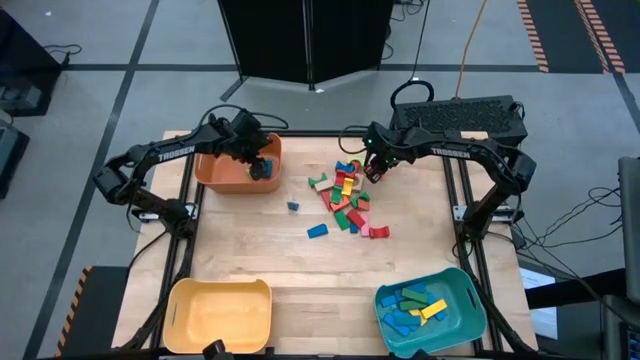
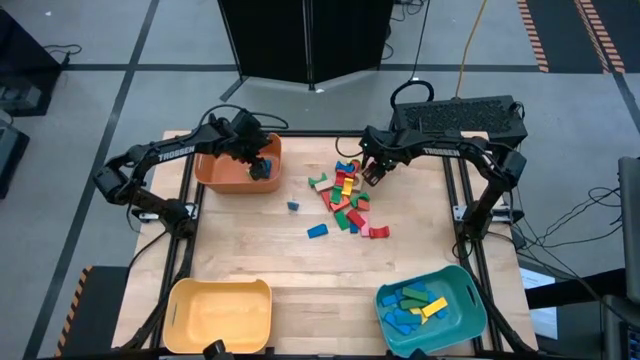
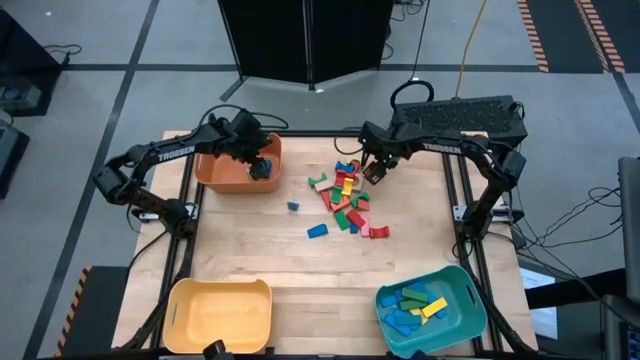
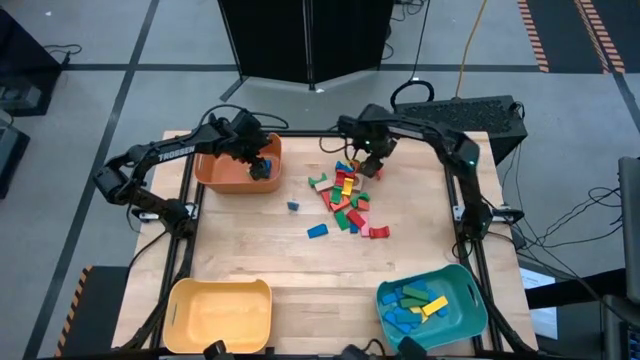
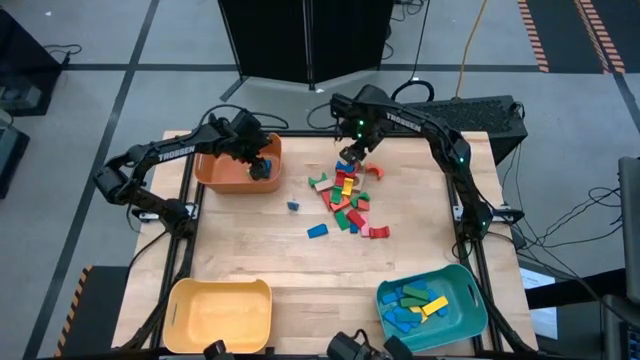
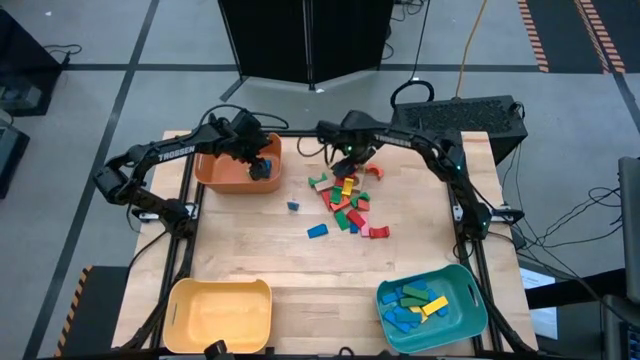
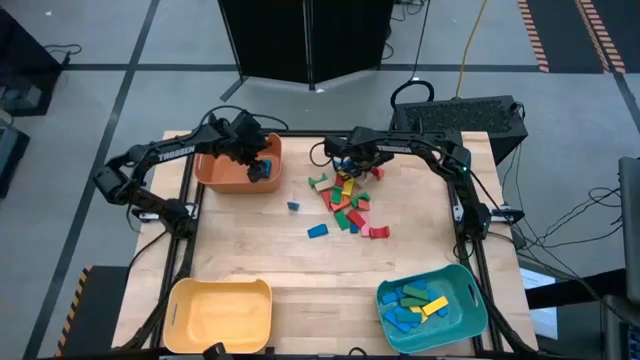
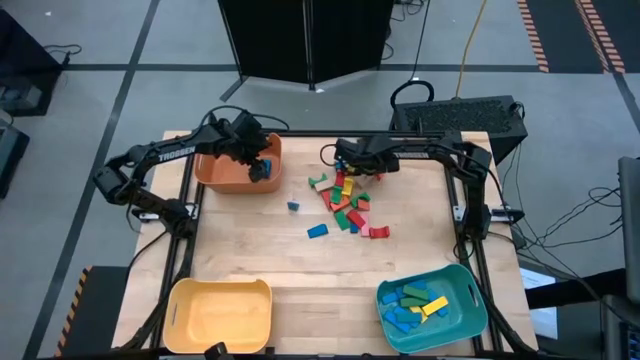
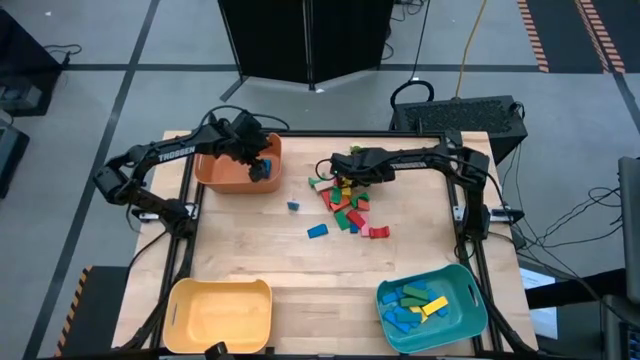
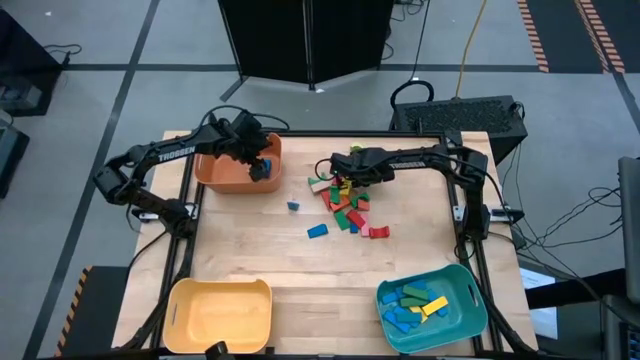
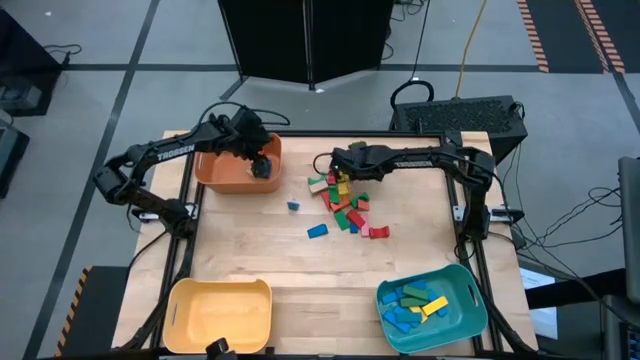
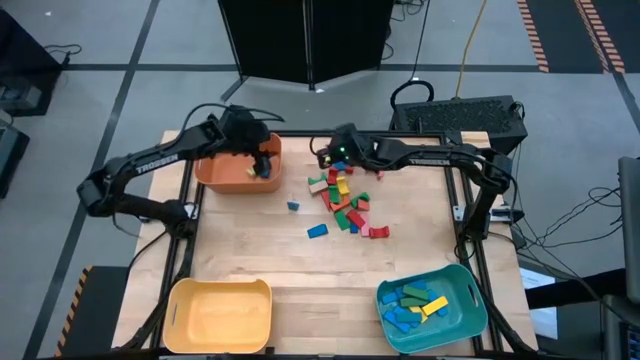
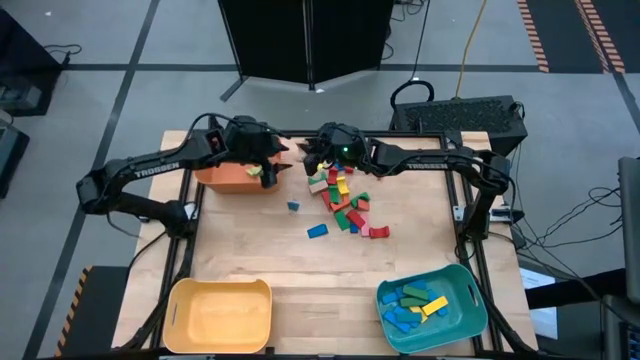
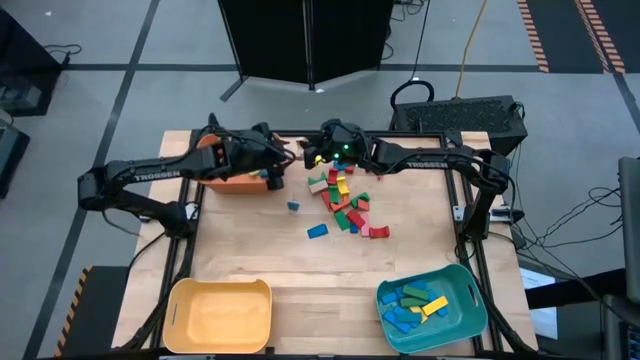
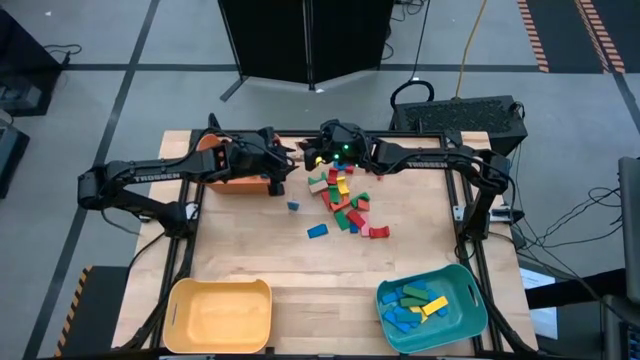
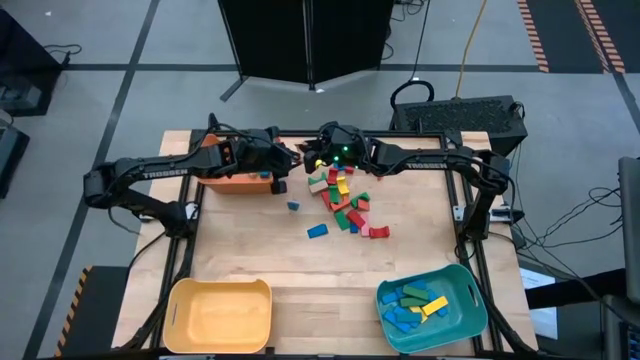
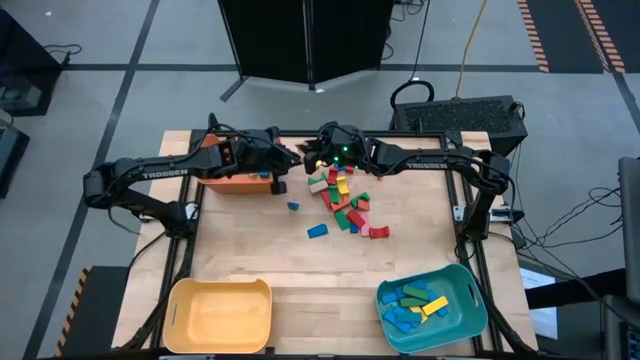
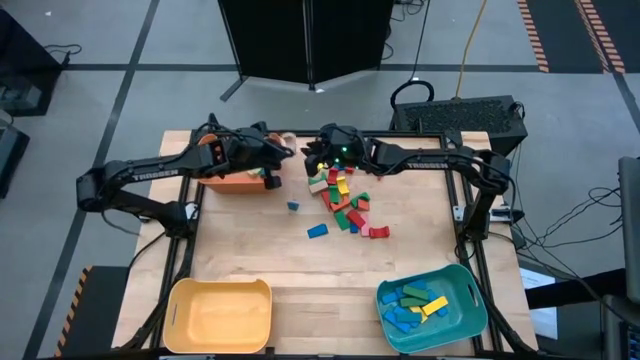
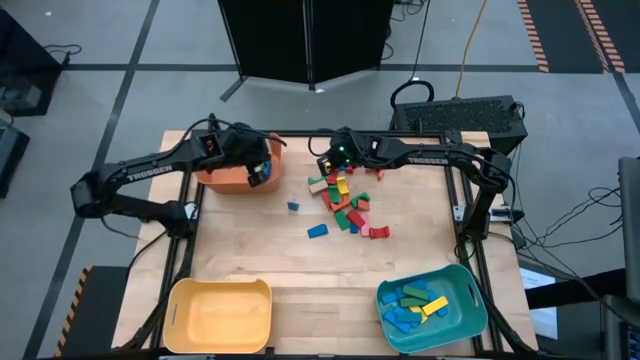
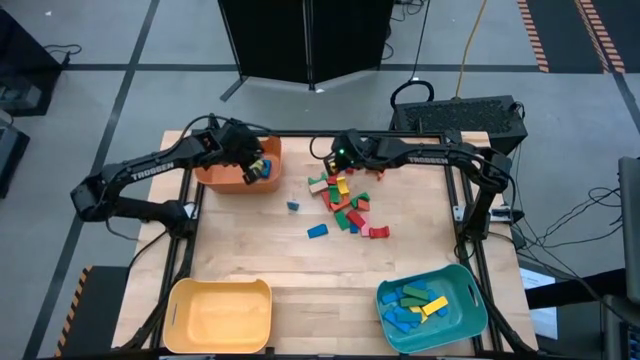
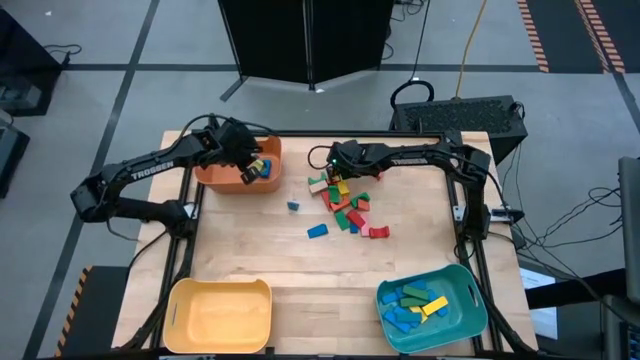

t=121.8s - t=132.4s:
Task: Sort blocks by size
Put the light brown arch block into the orange bin

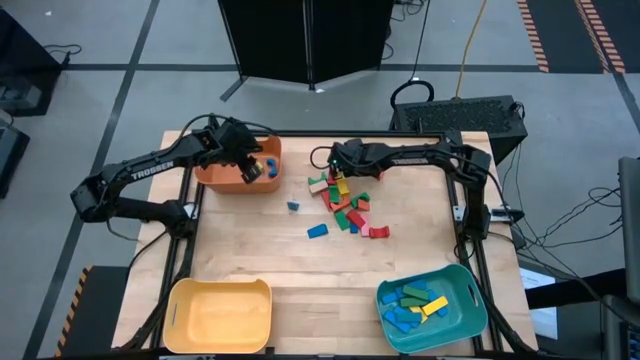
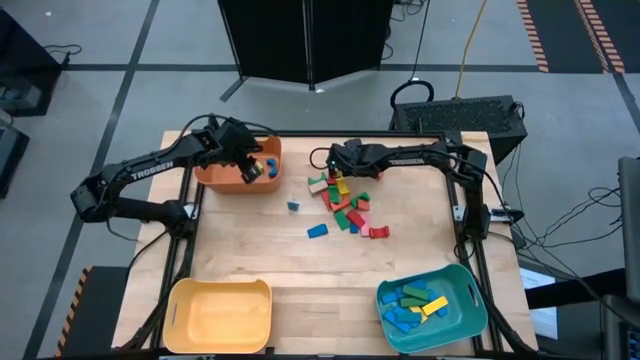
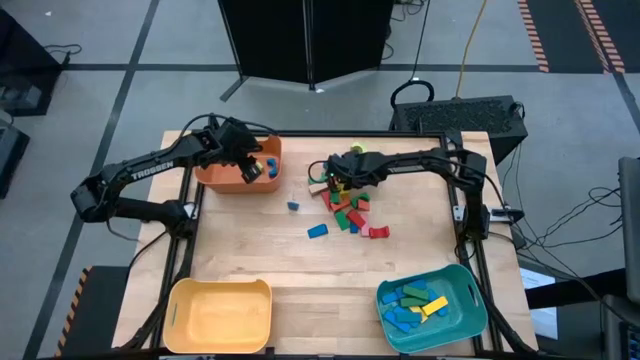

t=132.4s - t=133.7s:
Put the red arch block into the orange bin

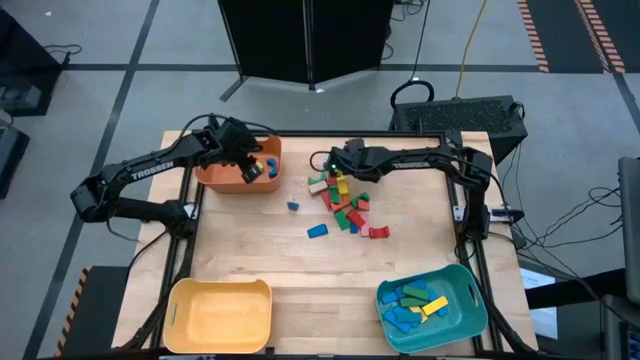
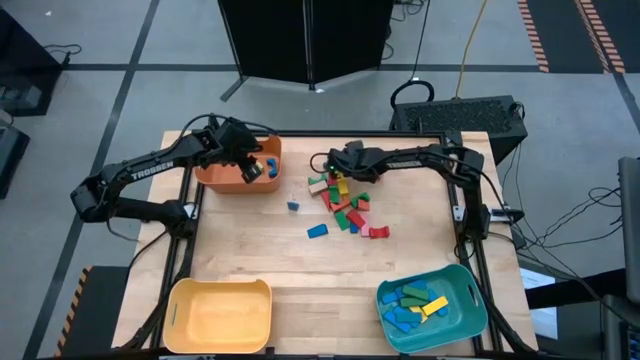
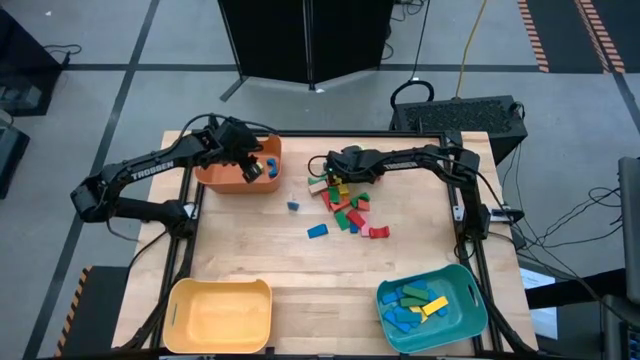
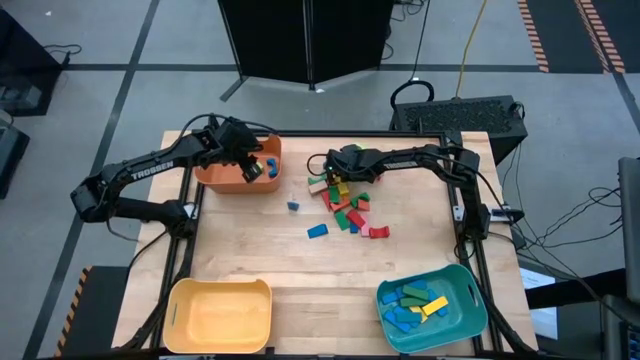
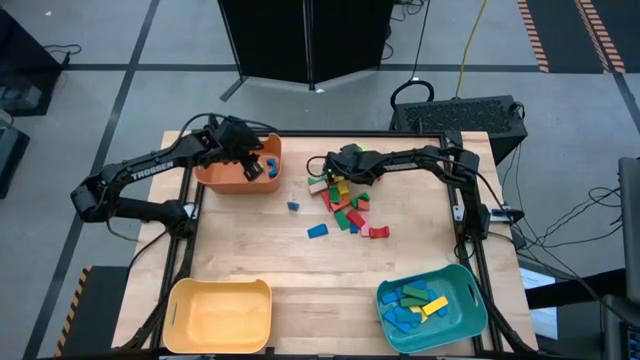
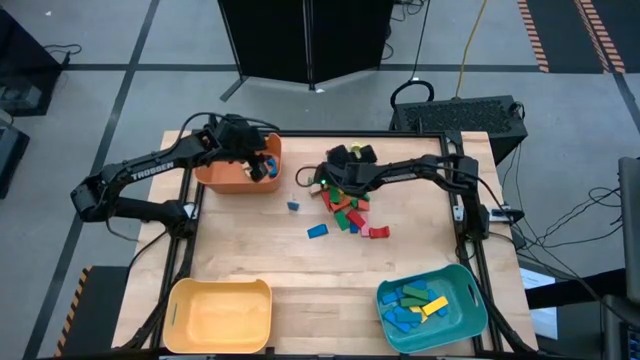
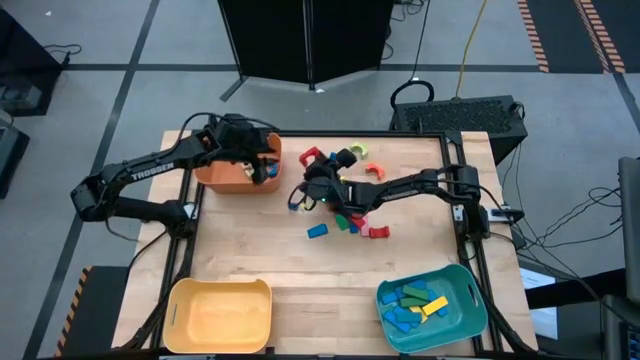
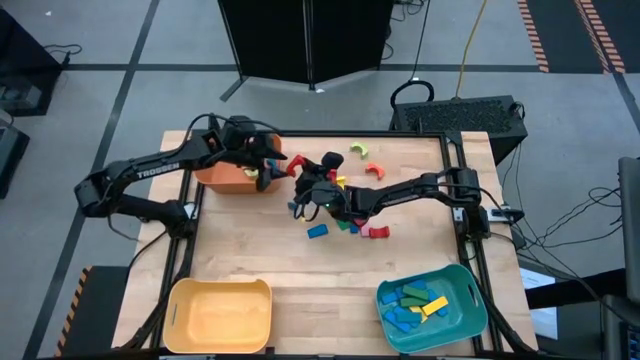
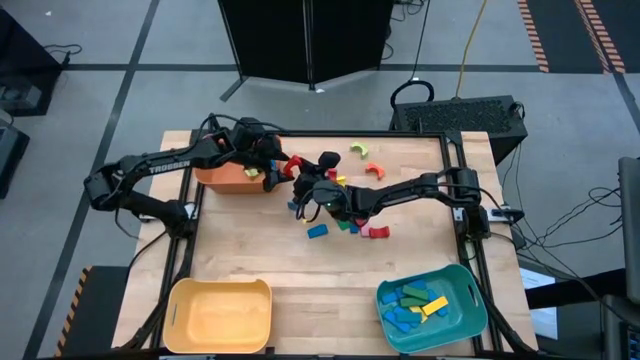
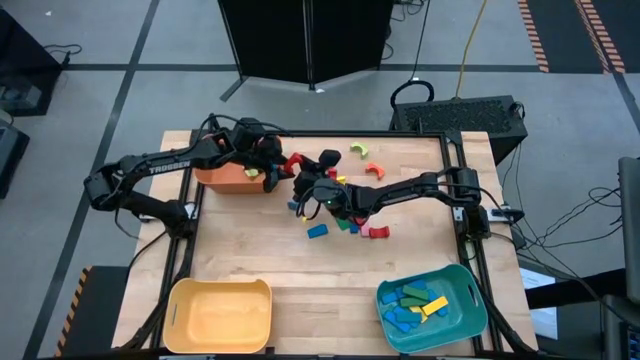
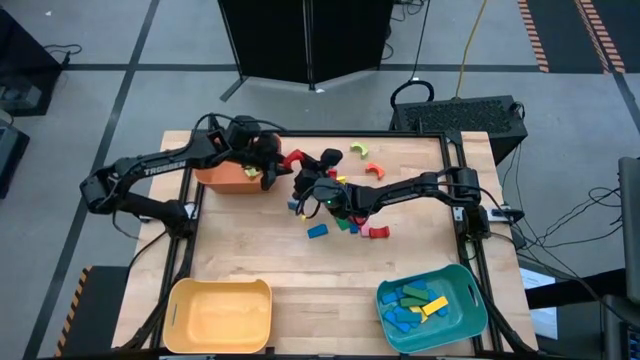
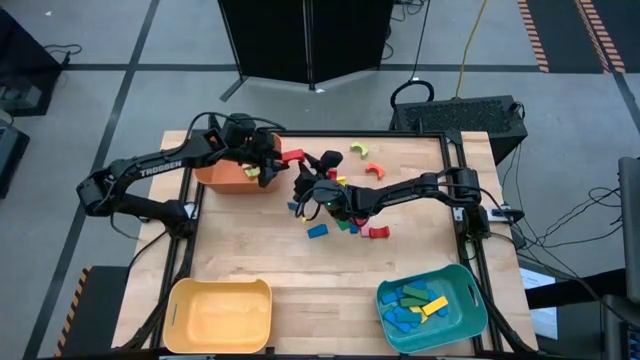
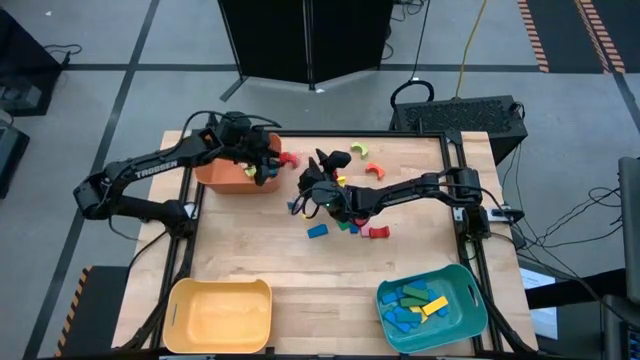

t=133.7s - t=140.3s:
Put the red arch block into the orange bin

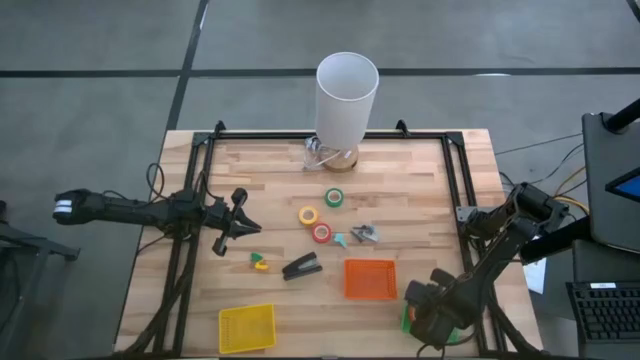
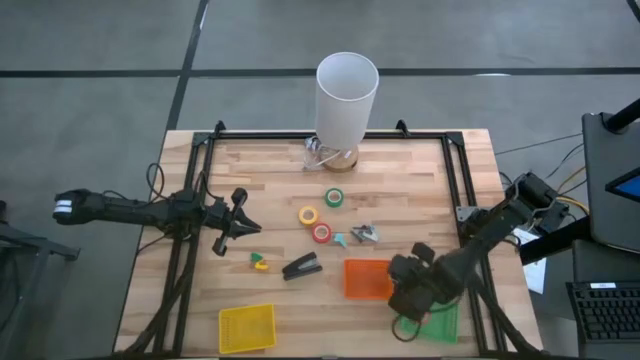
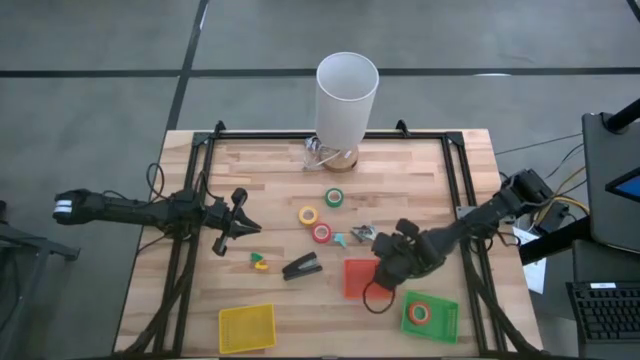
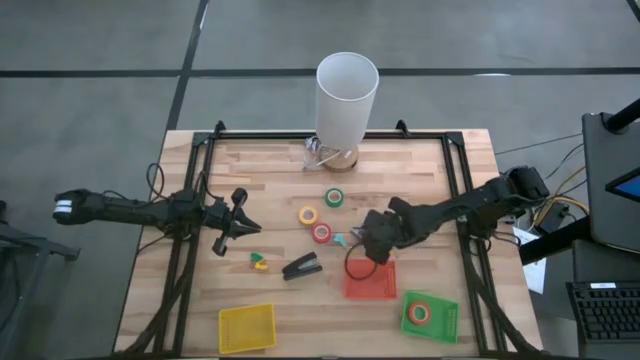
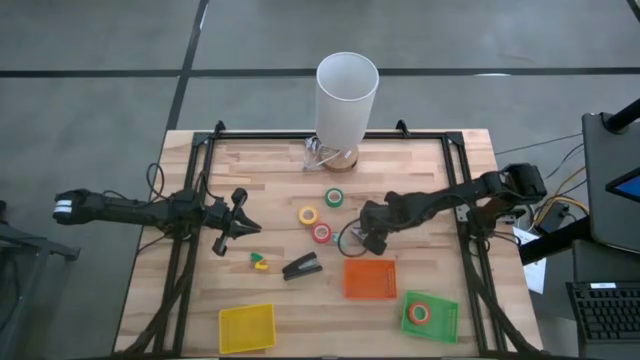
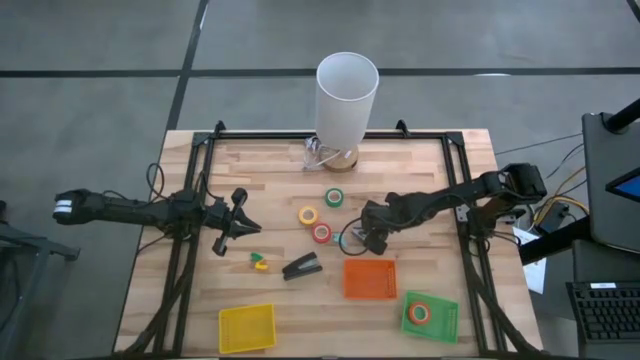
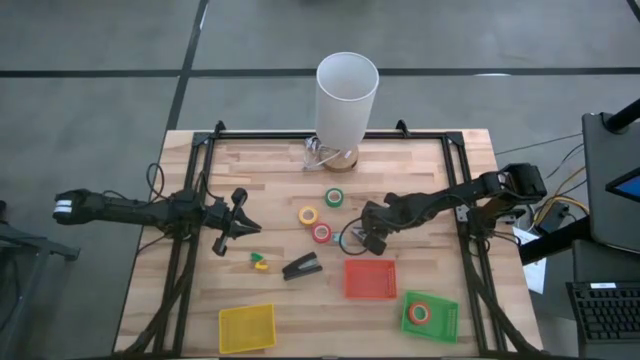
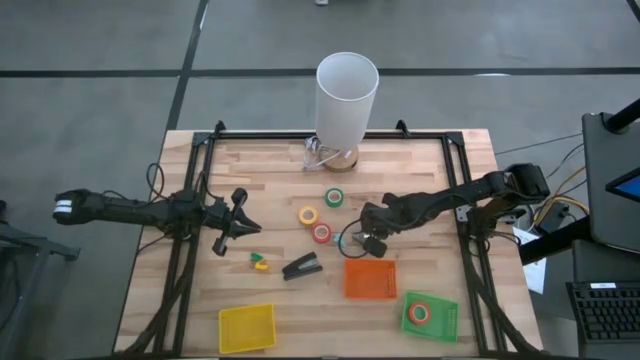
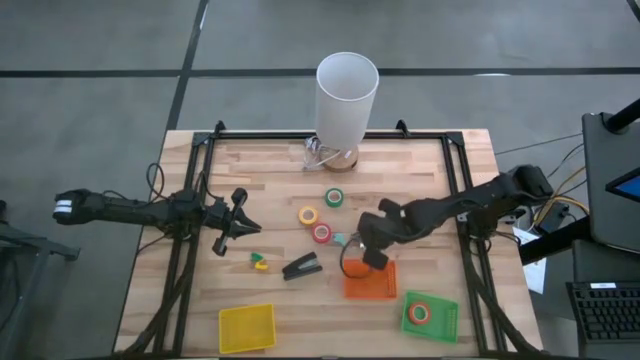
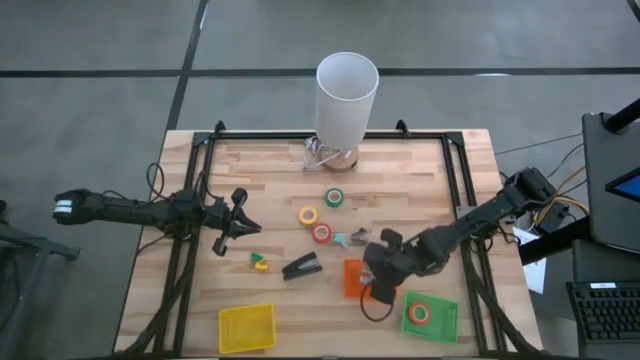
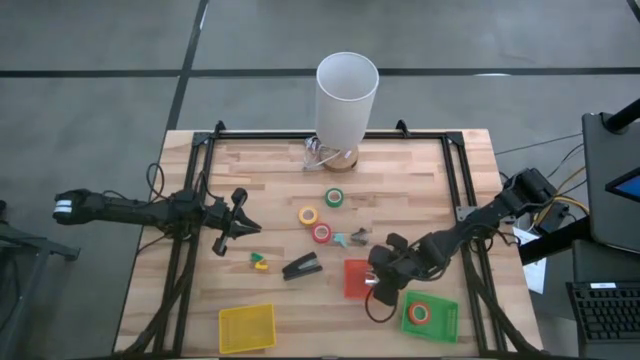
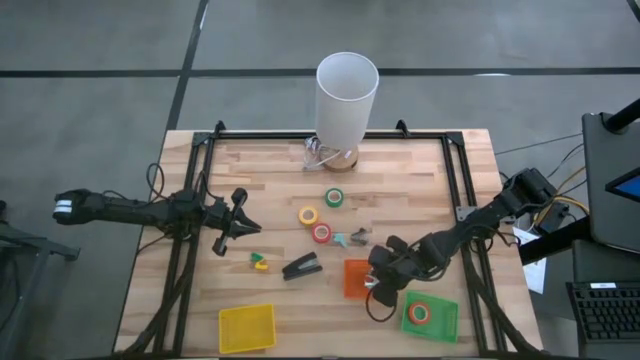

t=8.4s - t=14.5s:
Task: Pick and place Stapler, Stapler remover, tape
Put the blue stapler remover into the orange basket
